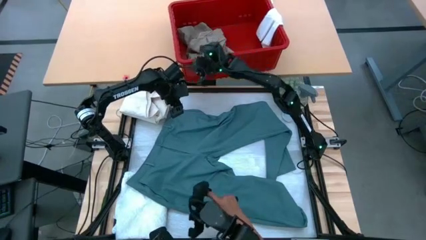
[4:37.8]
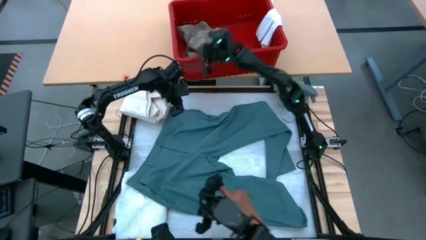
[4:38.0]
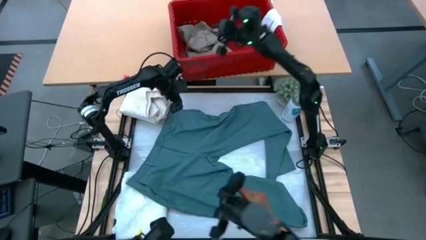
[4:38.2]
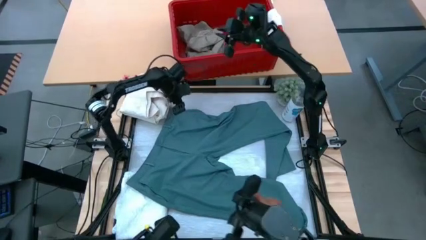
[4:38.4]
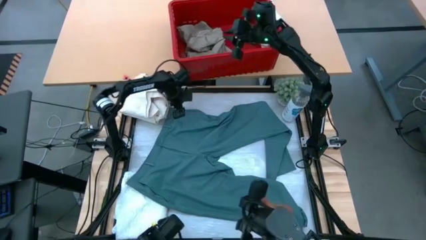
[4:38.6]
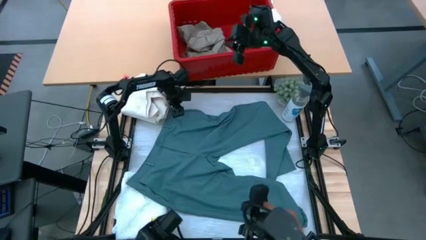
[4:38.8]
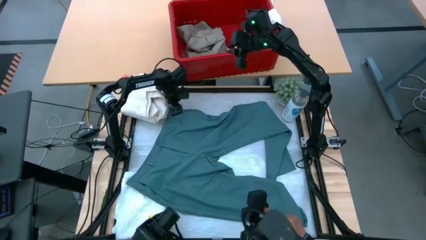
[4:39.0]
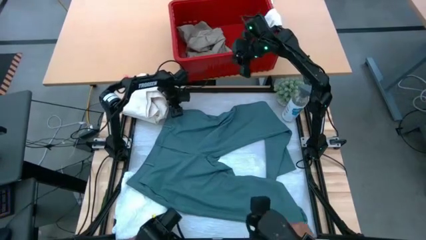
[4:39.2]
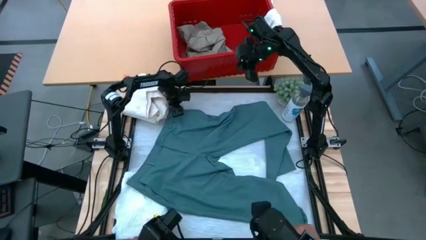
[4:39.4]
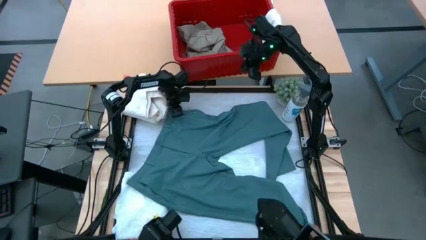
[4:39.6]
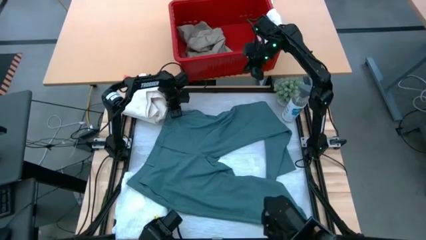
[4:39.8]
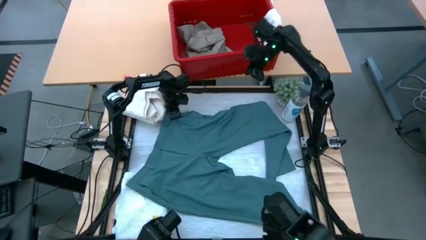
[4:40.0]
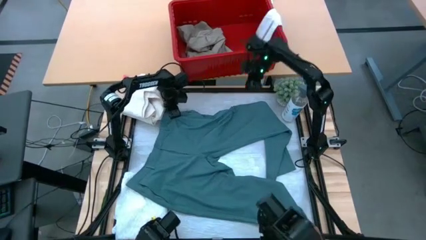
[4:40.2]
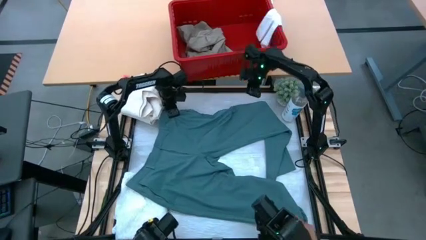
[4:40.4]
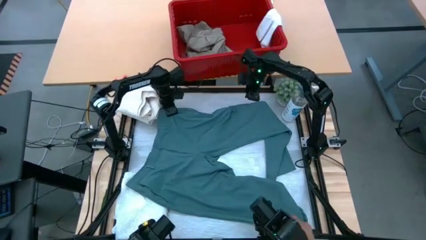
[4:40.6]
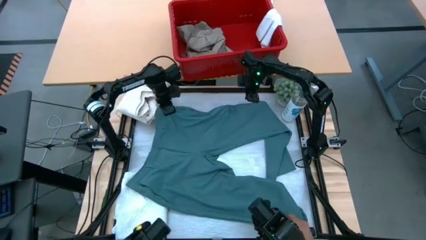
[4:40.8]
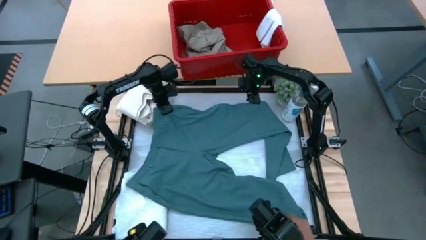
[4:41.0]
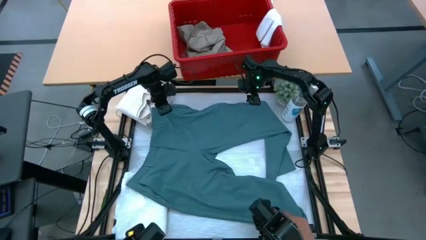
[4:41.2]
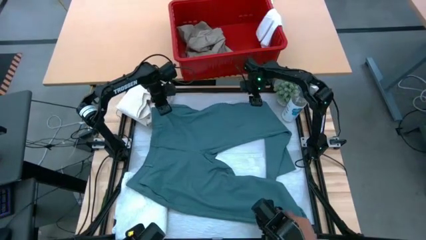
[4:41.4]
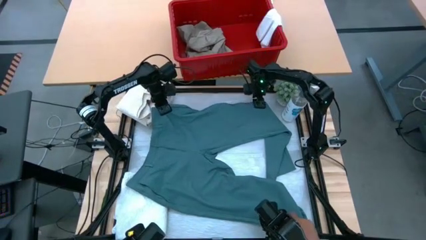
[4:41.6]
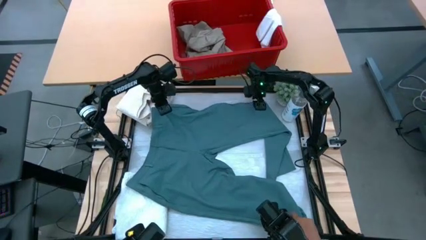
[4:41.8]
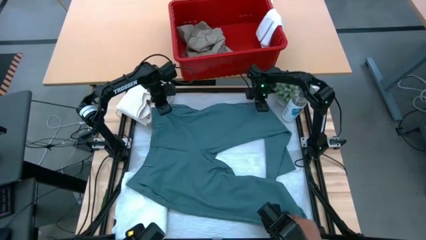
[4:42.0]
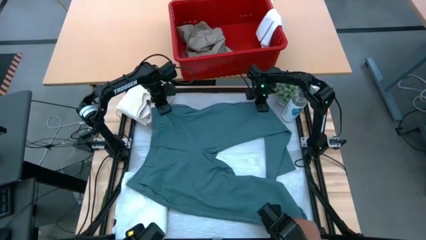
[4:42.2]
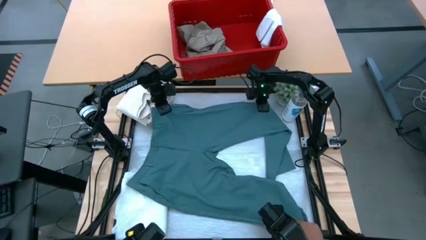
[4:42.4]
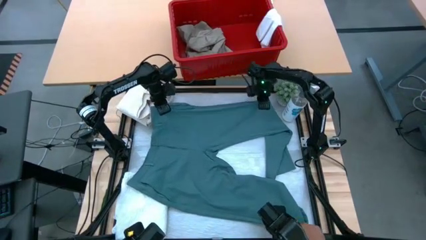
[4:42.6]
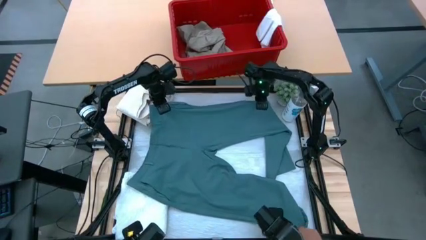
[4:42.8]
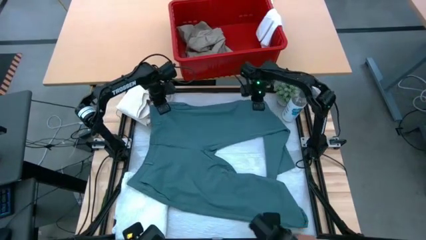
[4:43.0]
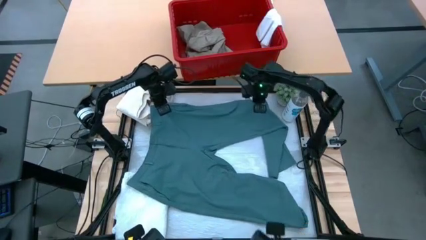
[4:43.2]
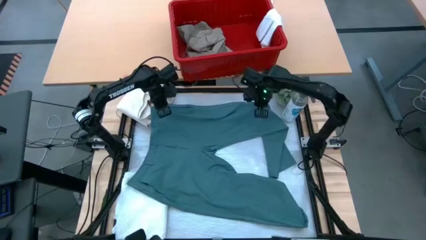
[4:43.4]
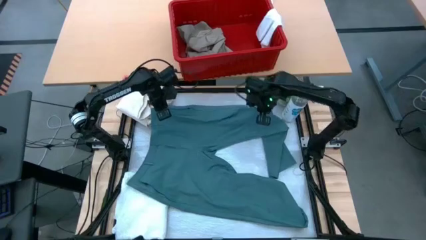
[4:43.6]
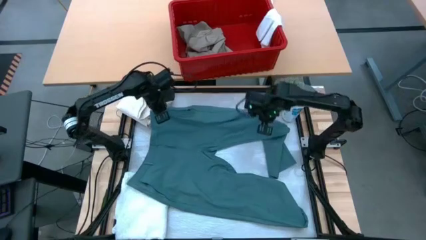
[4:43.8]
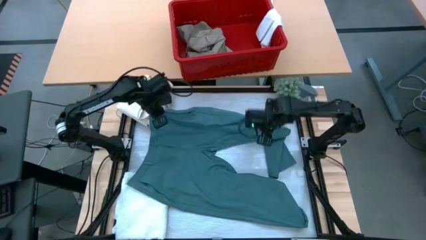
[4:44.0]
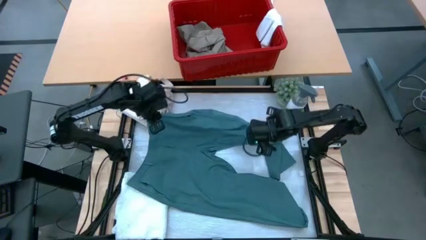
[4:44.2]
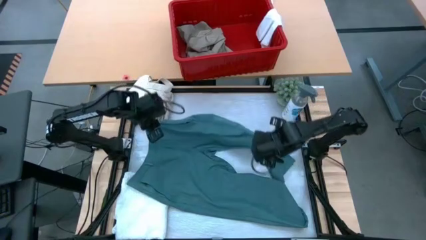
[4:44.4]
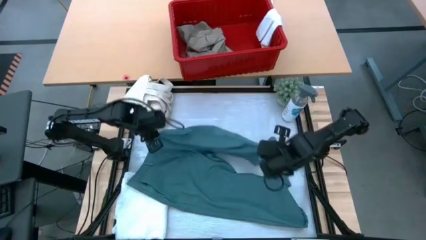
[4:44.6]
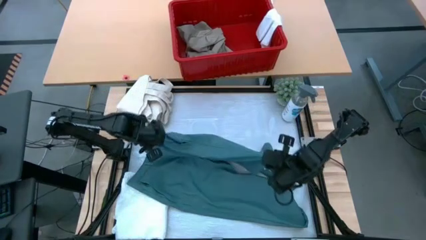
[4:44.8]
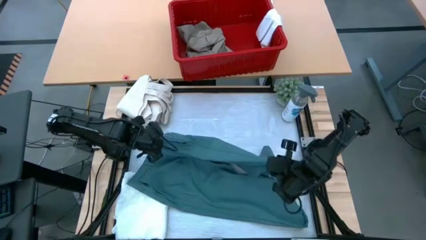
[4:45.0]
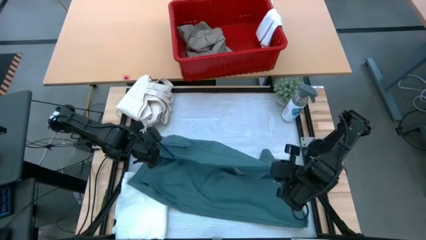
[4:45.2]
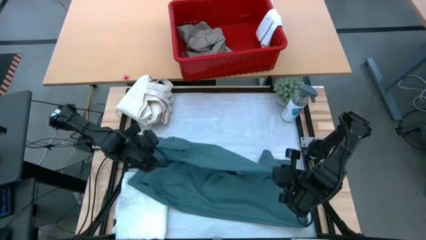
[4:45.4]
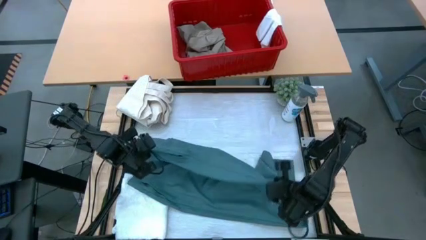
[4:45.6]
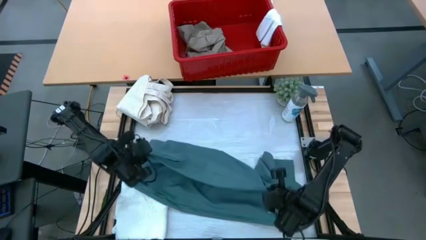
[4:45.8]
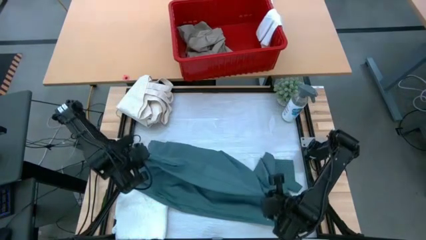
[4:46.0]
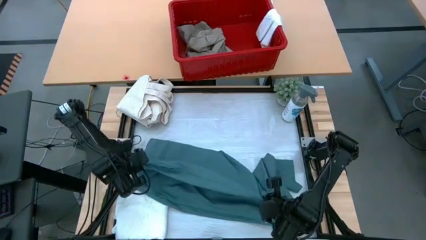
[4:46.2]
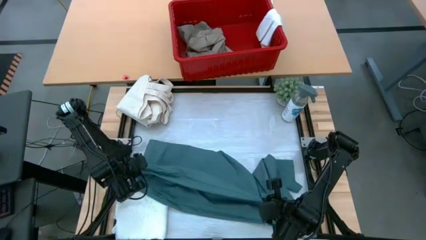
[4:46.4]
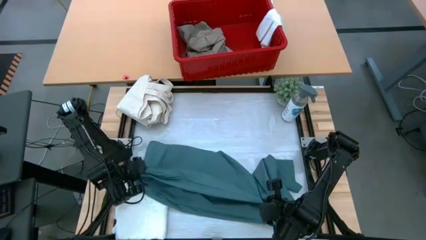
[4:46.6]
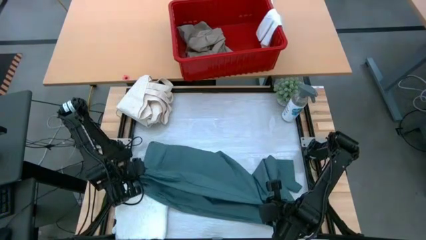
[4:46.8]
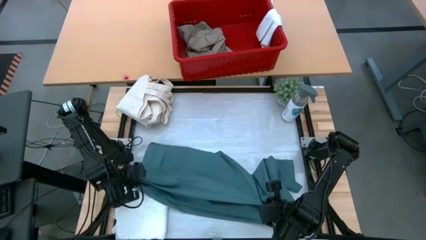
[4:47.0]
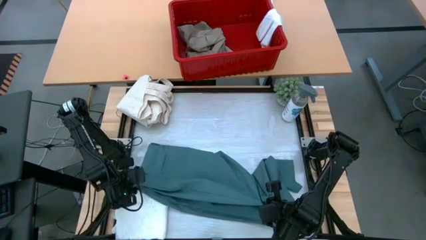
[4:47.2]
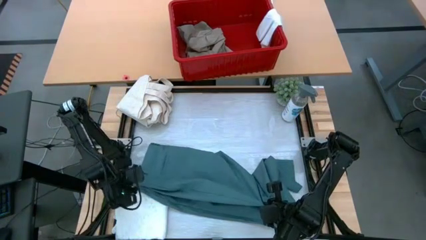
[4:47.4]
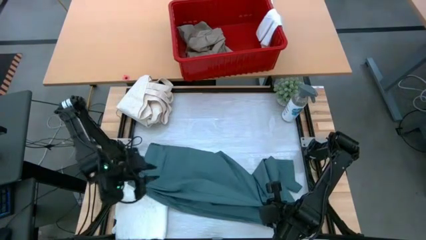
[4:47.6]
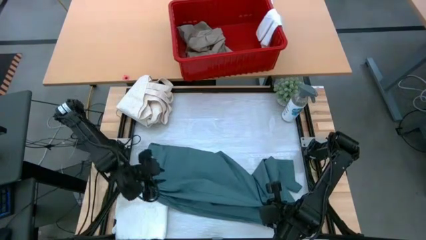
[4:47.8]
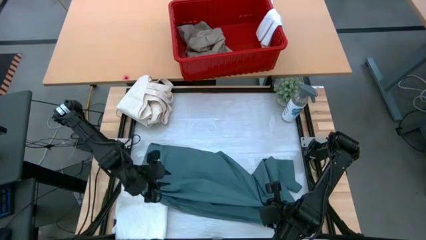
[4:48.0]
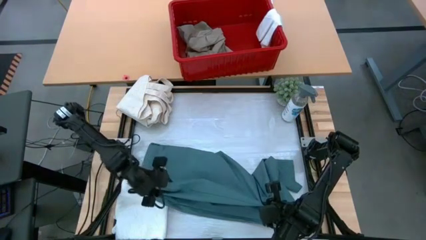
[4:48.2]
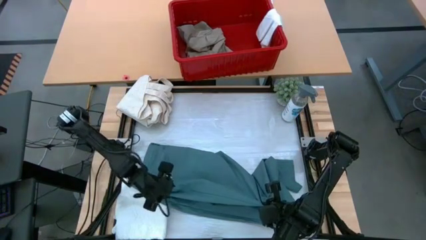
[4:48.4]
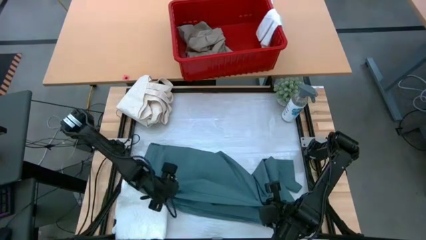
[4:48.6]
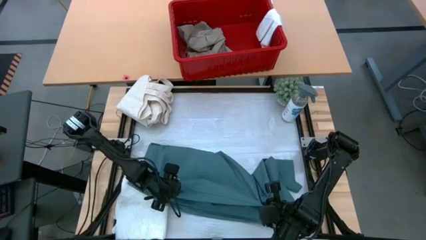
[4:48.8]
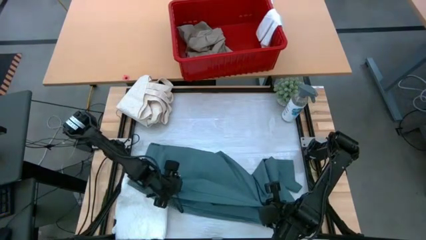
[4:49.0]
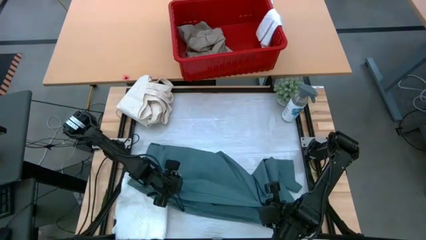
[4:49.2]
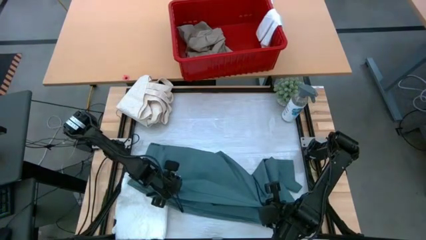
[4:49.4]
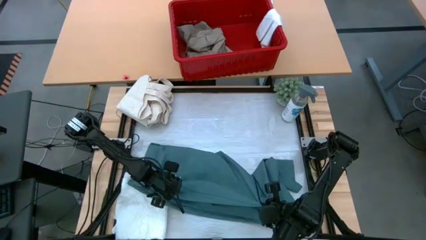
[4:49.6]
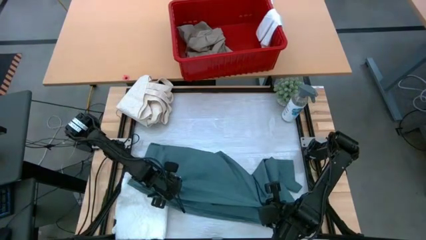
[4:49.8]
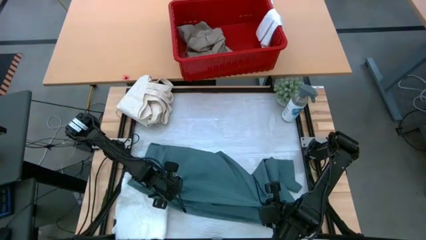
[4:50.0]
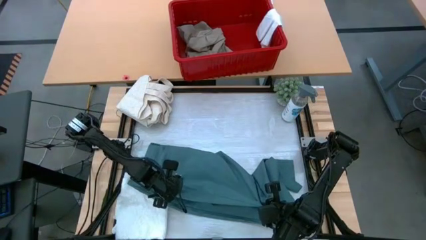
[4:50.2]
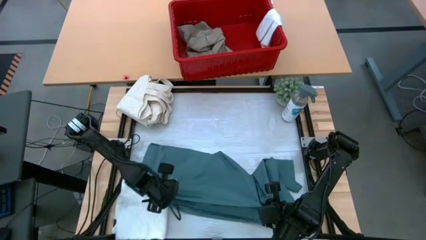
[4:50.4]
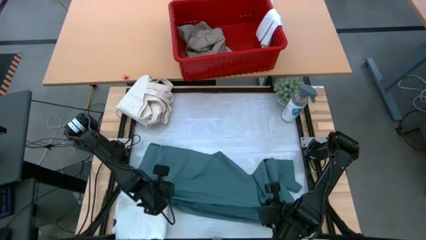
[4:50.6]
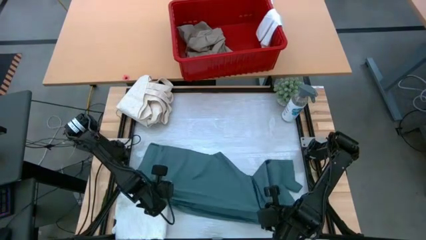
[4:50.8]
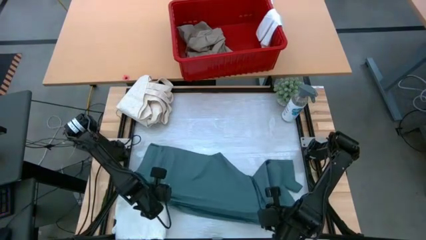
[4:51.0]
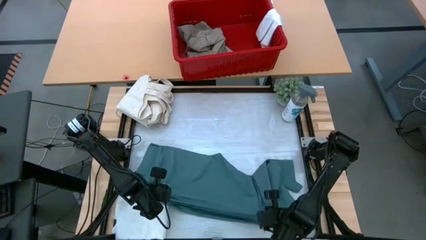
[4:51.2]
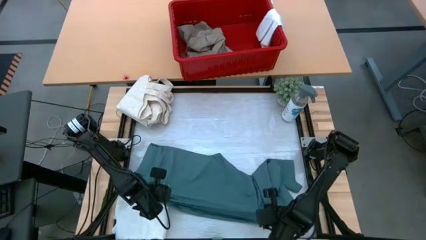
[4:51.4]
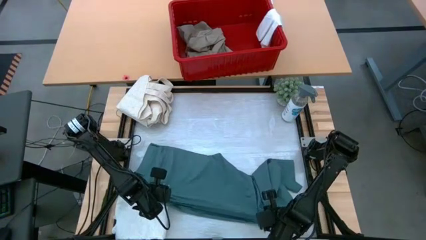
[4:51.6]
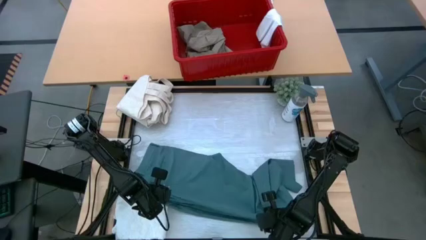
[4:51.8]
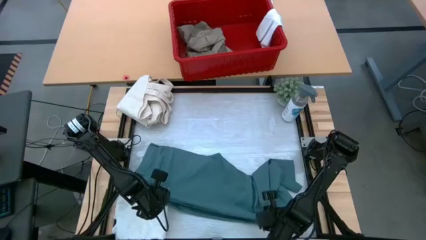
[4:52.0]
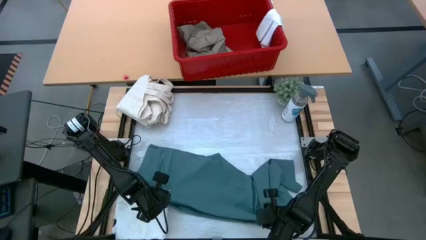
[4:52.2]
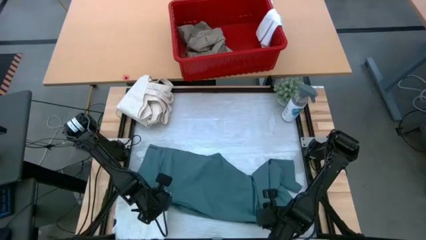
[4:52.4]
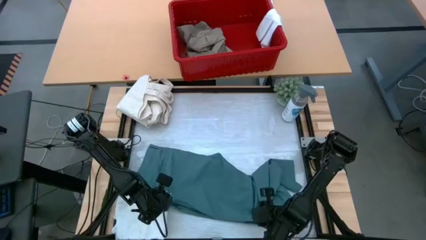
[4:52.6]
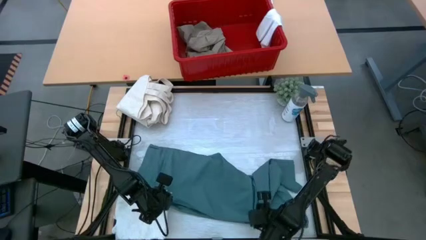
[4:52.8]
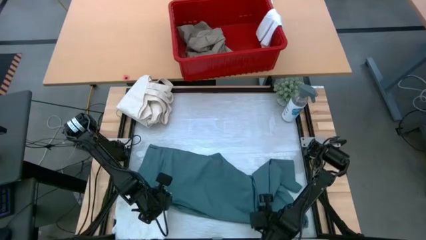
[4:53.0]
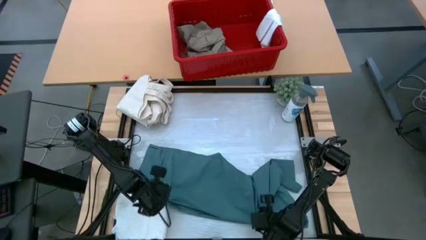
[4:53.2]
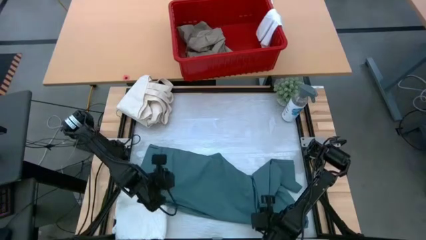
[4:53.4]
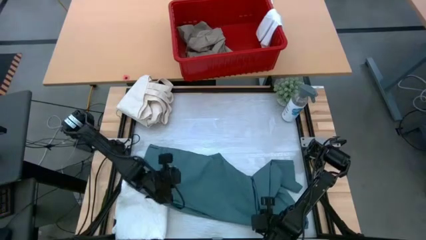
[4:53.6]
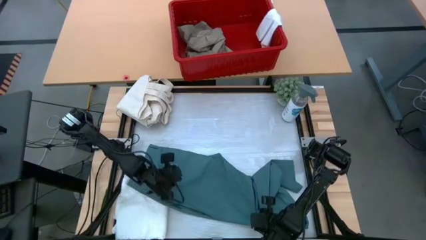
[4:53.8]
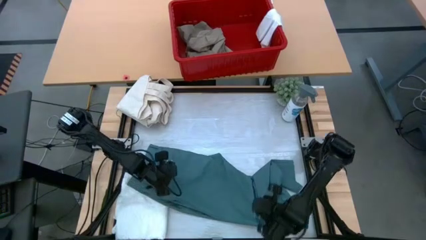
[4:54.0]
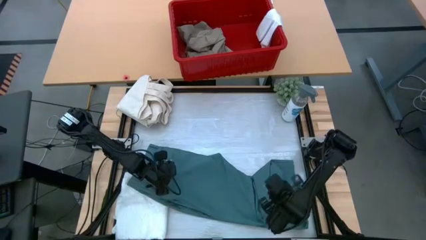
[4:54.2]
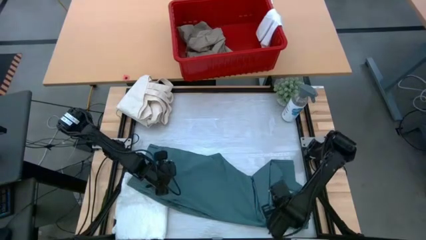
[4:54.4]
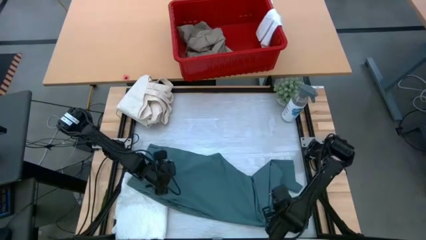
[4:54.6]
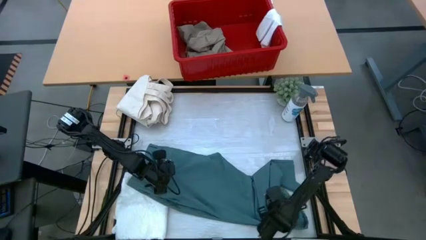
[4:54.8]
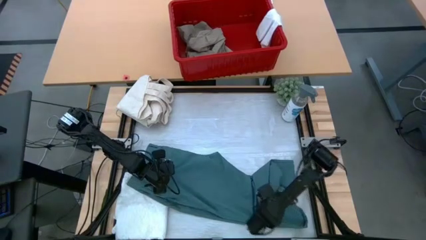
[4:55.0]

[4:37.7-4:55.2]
Task: Fold Laundry from Bin
Fold the blue pants
